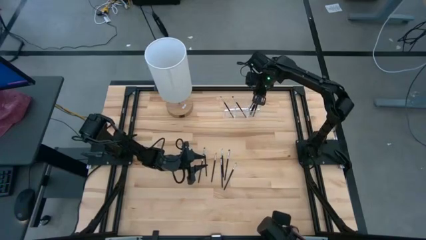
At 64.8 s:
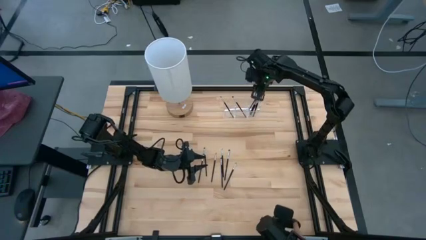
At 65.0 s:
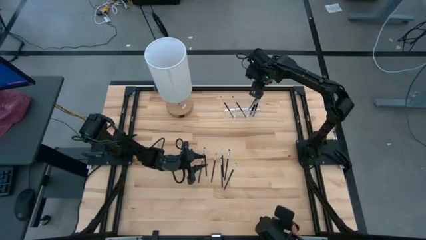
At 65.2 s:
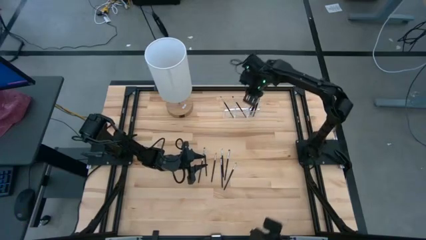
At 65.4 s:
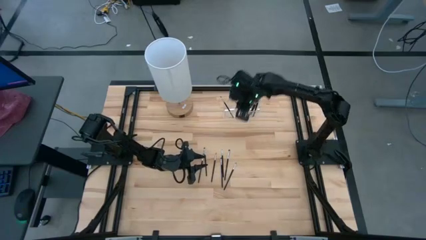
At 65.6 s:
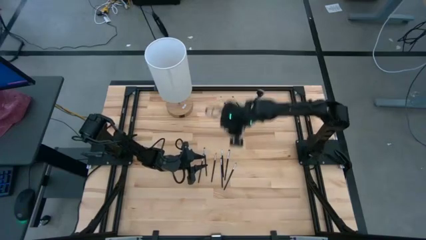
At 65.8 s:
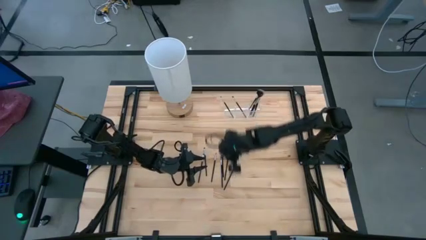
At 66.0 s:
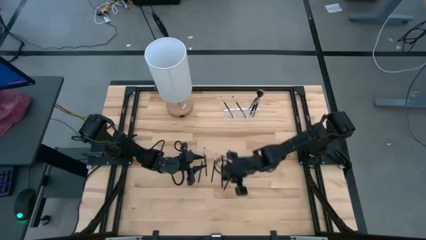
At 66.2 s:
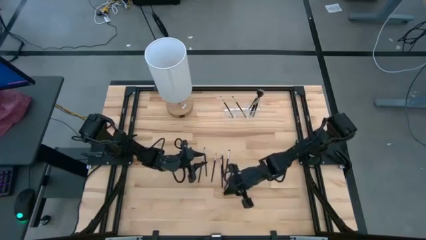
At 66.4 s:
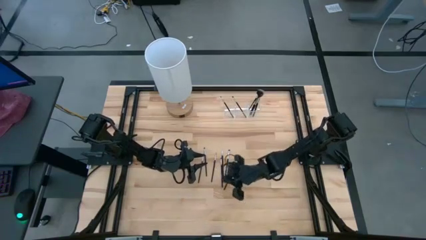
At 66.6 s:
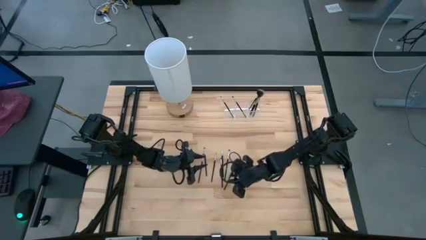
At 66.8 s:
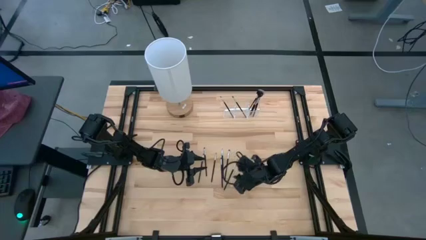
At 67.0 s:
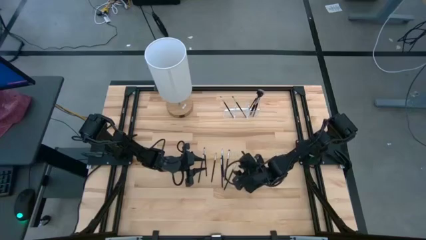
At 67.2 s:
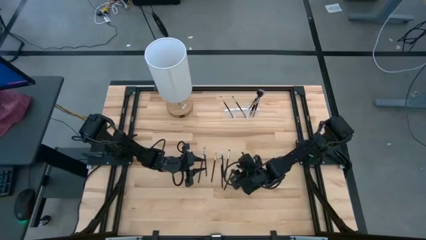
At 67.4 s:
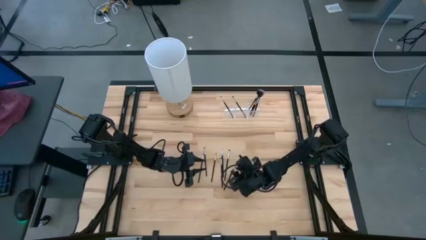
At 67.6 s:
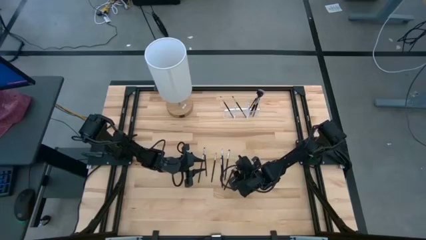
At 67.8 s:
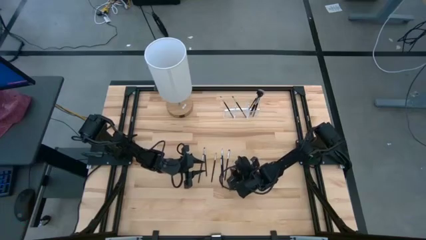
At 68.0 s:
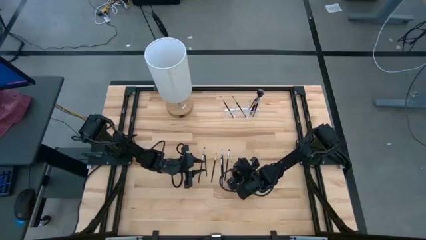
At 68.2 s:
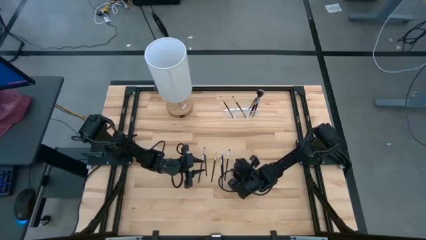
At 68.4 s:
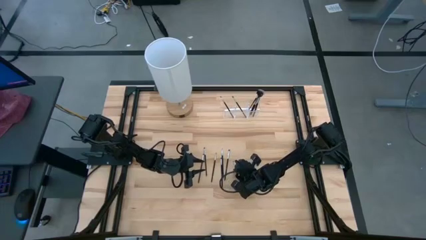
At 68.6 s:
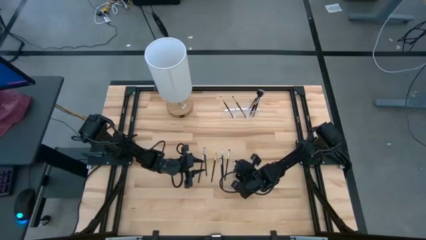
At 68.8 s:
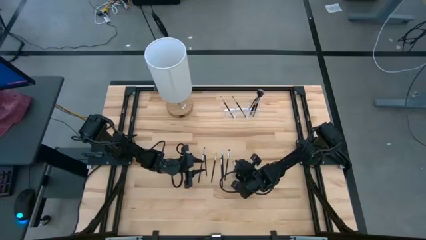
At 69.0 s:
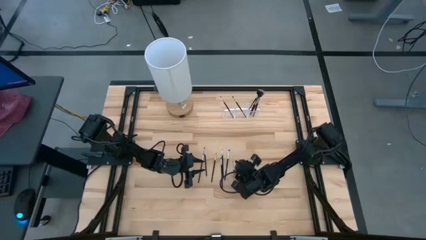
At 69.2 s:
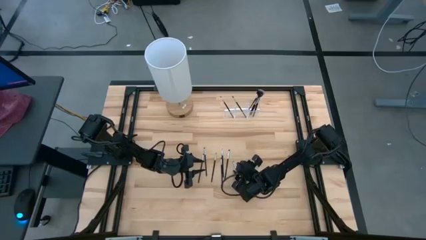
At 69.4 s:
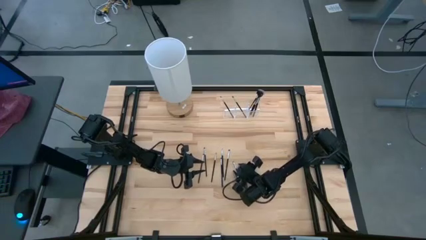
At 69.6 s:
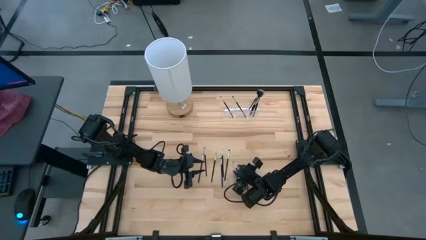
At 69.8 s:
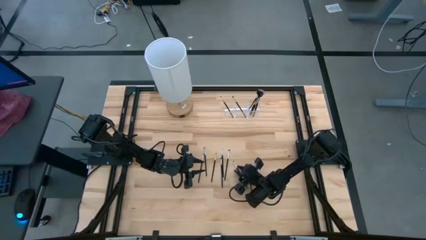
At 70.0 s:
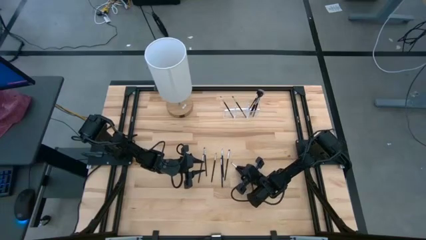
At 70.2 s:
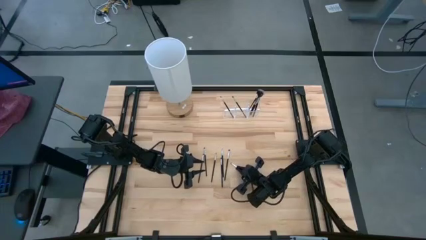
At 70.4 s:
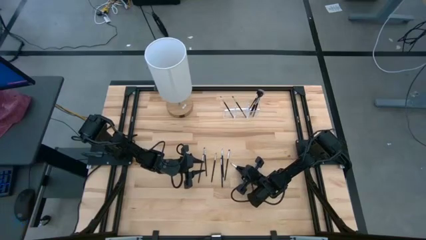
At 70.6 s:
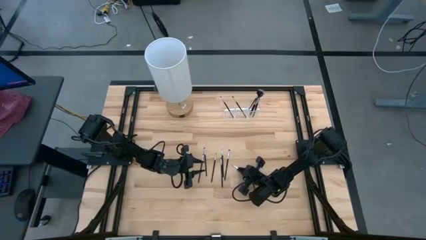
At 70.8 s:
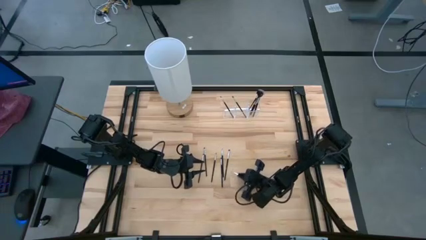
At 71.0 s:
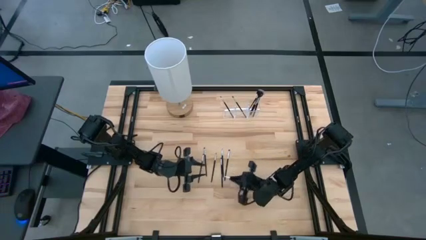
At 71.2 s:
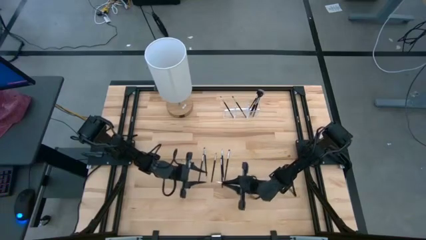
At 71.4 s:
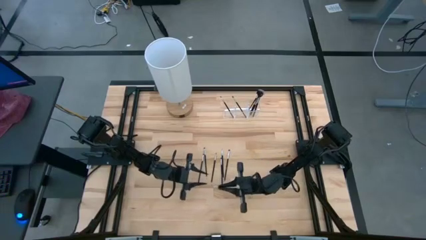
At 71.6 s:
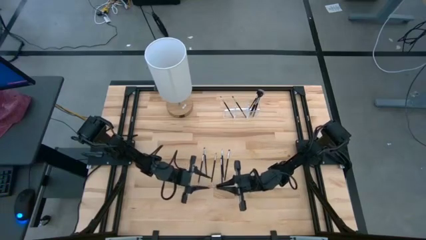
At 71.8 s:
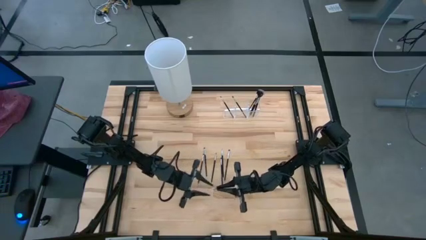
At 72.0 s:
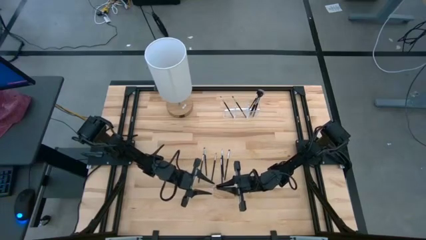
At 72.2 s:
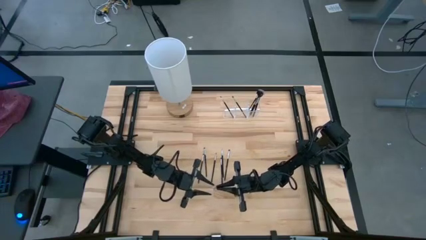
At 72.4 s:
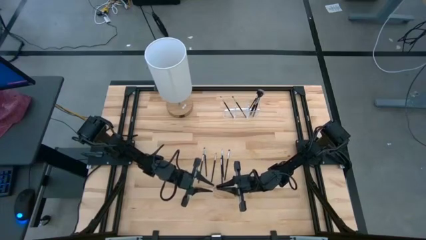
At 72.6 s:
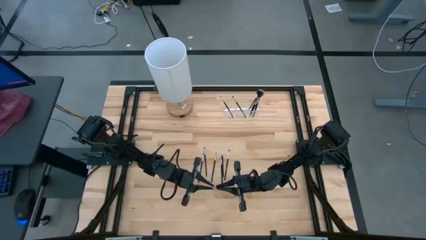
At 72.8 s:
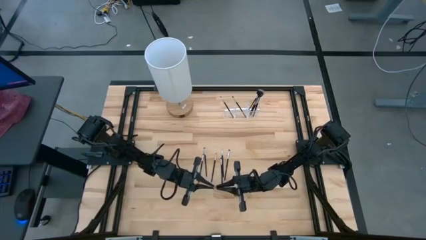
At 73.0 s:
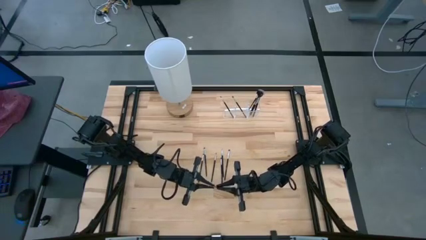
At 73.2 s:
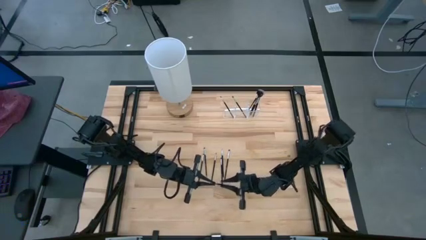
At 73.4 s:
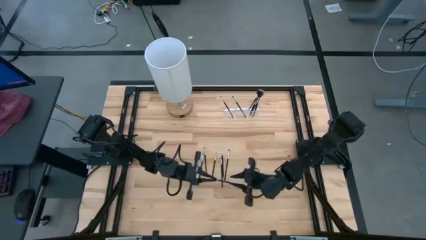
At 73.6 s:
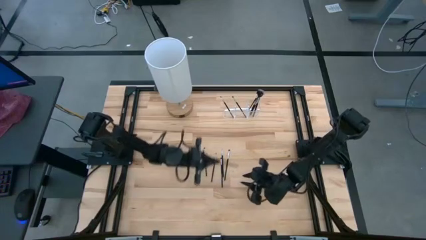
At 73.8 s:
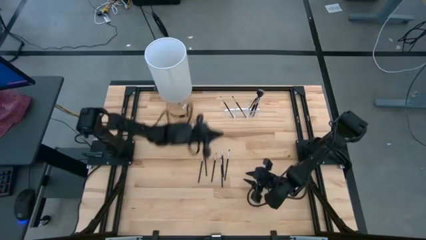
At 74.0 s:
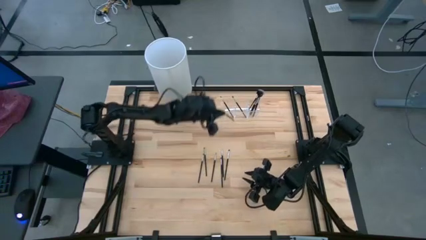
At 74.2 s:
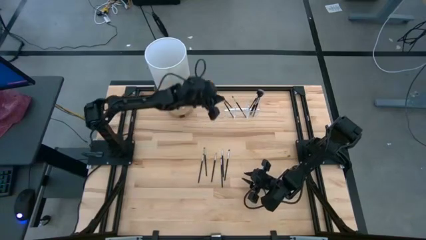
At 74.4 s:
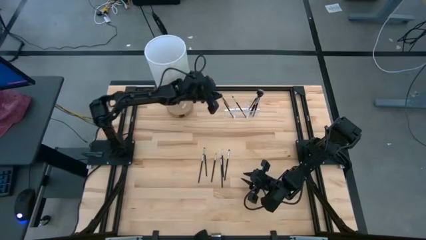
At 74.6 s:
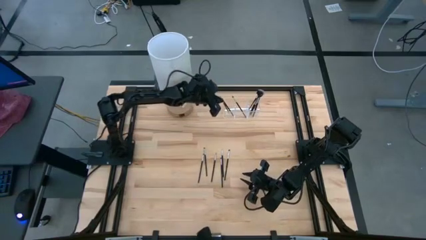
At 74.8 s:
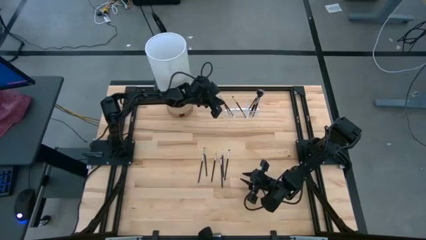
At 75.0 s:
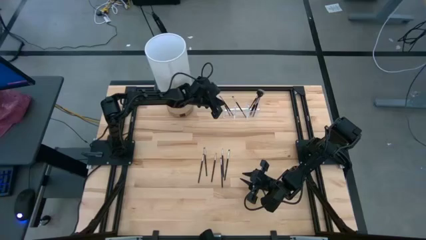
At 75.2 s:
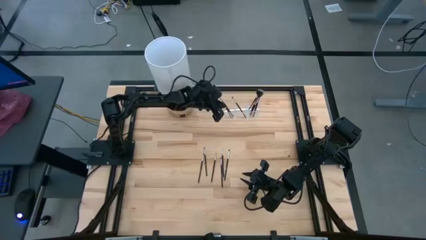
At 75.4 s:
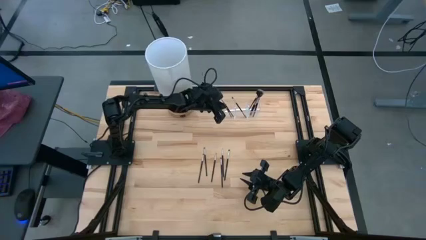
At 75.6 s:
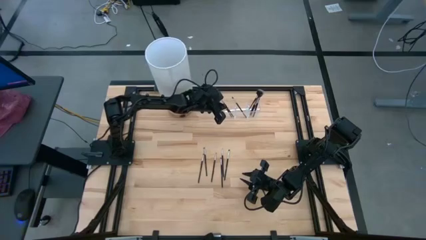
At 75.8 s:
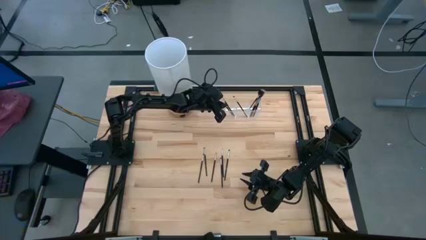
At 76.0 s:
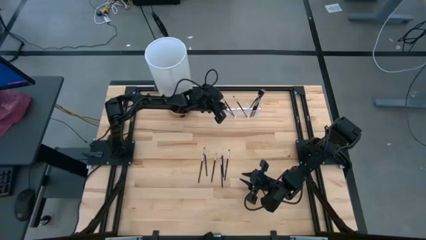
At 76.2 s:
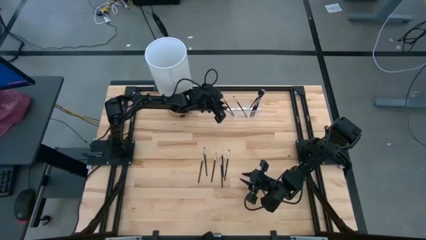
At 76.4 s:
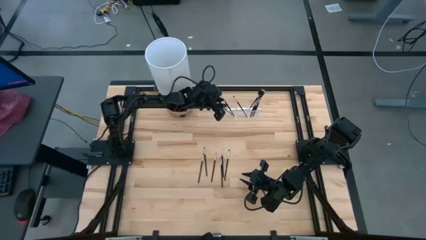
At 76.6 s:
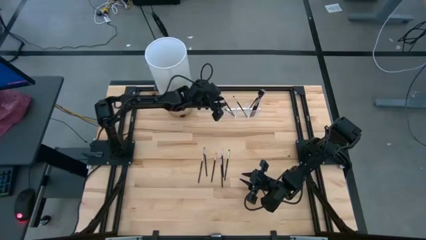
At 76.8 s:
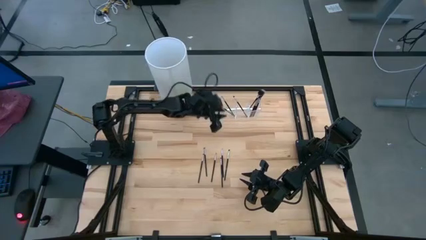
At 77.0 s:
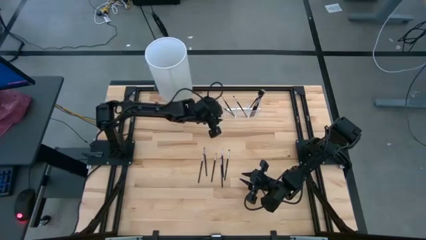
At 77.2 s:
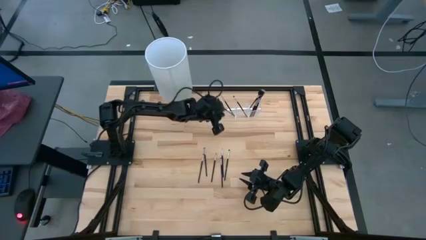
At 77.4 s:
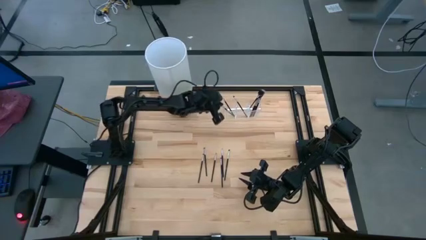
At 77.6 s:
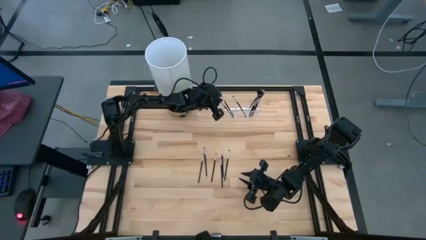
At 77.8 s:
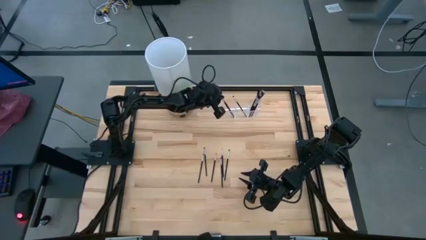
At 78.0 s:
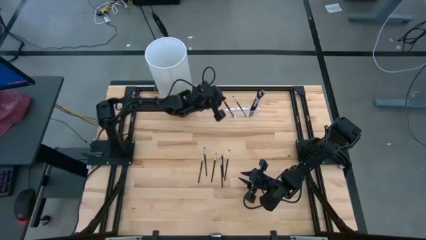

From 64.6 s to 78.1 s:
Task: Sort items
Put the eyeshadow brush into the transparent organizer

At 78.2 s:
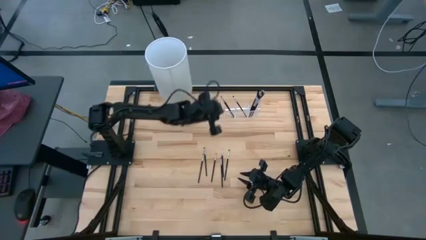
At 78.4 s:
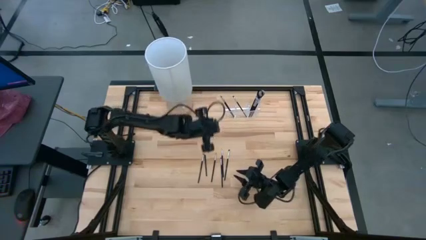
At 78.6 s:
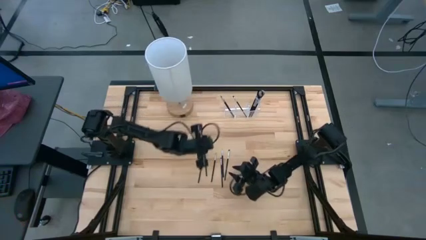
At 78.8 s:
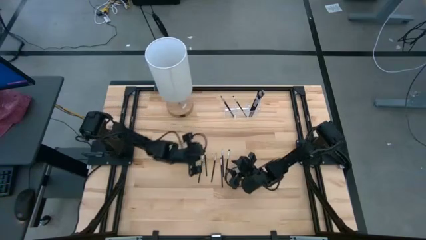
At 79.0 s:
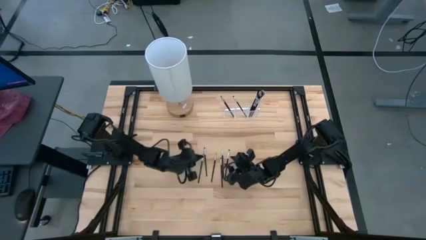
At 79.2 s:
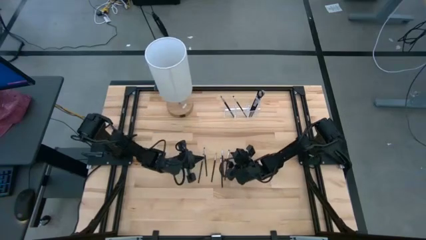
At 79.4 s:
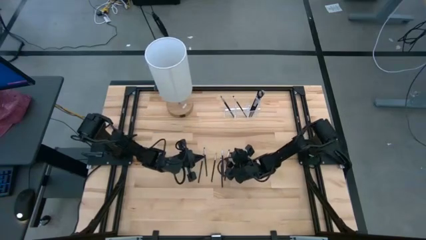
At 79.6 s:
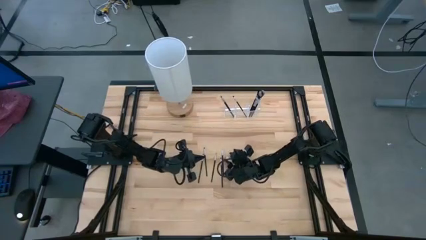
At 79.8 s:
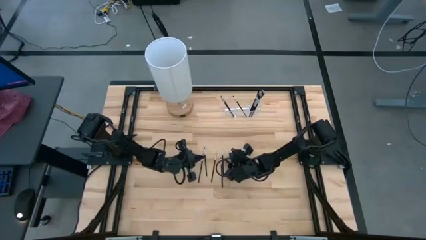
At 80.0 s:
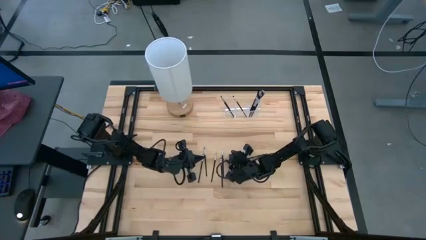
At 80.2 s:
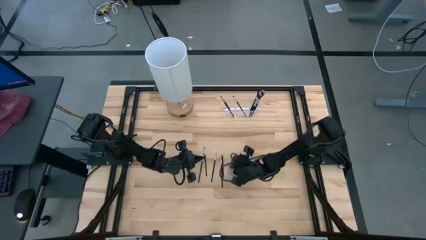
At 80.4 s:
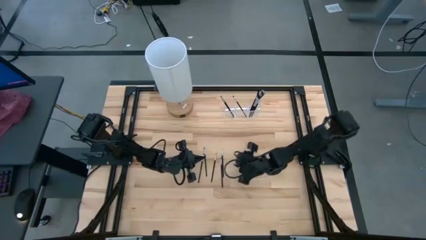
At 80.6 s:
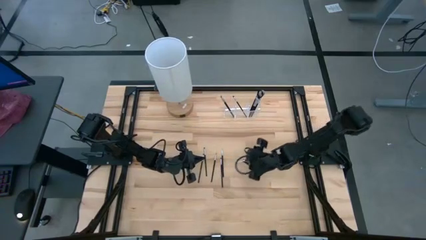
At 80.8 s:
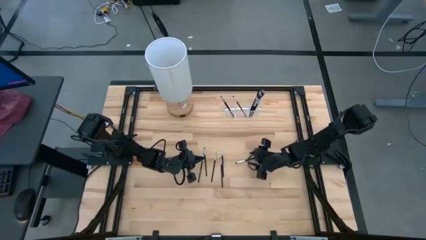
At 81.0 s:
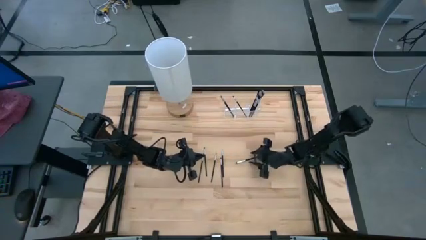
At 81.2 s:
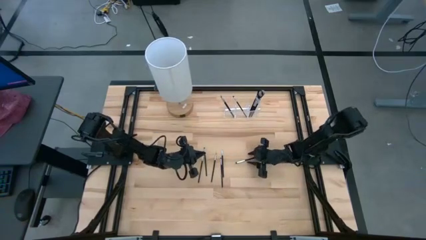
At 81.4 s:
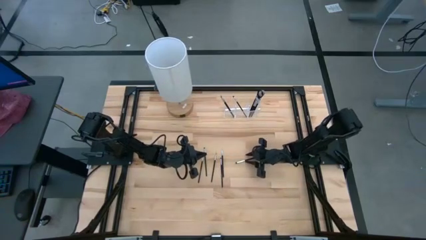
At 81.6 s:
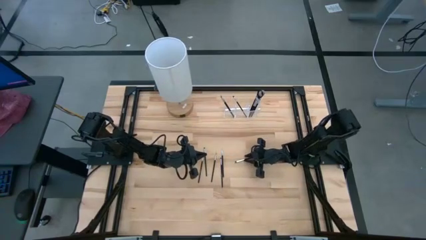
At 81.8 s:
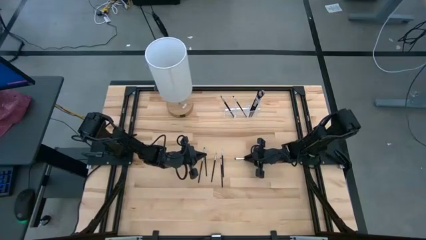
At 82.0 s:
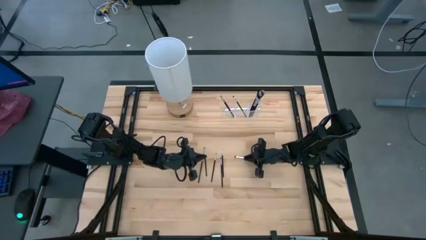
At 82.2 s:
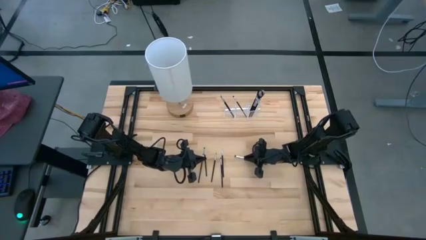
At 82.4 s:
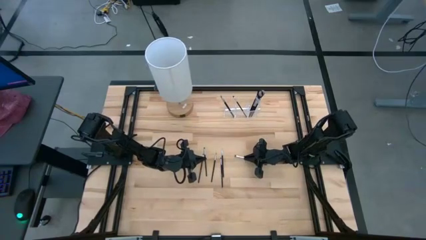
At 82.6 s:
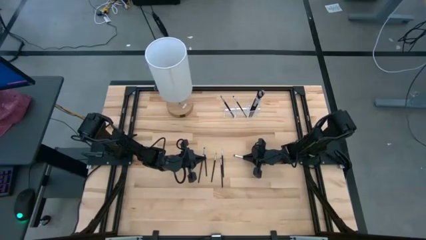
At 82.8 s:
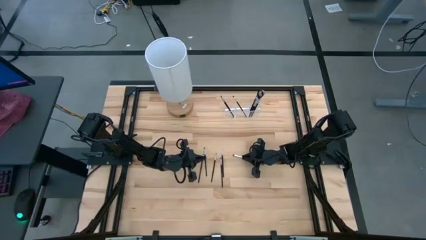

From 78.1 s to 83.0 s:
Put the eyeshadow brush into the transparent organizer
